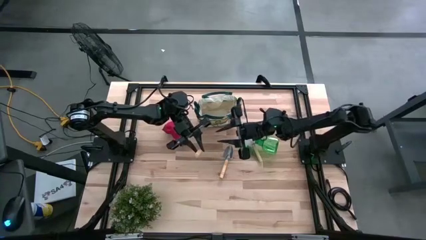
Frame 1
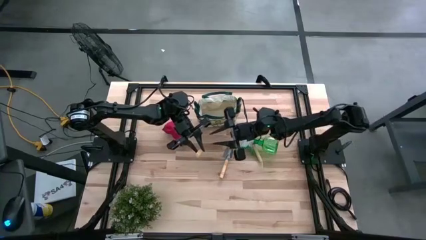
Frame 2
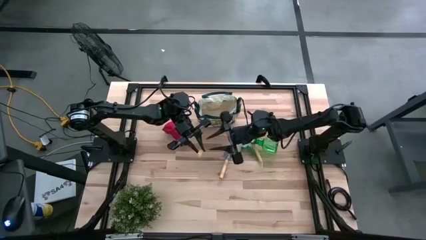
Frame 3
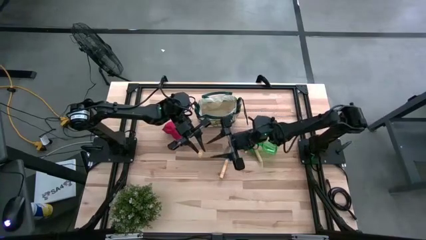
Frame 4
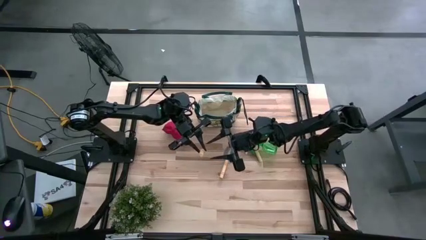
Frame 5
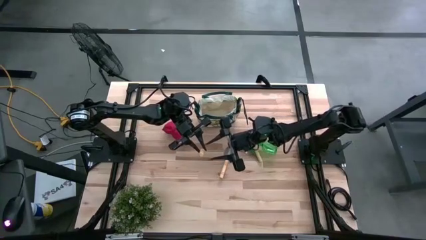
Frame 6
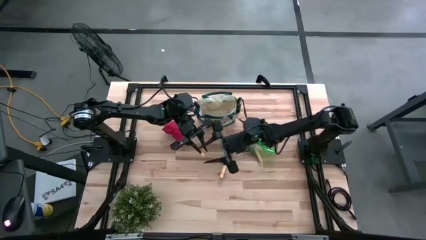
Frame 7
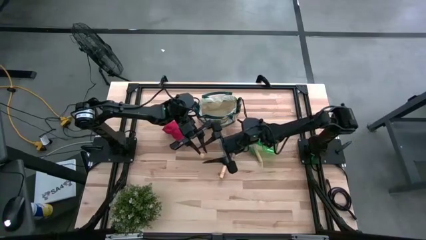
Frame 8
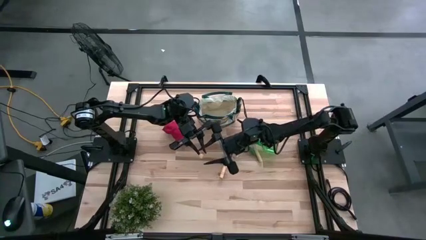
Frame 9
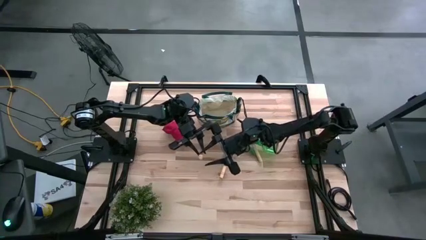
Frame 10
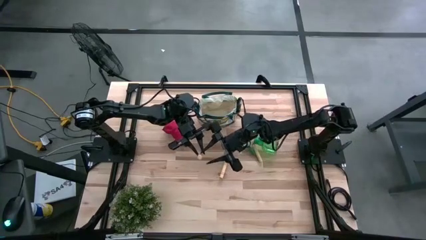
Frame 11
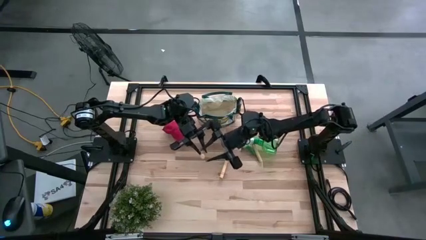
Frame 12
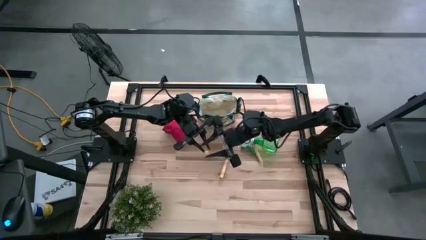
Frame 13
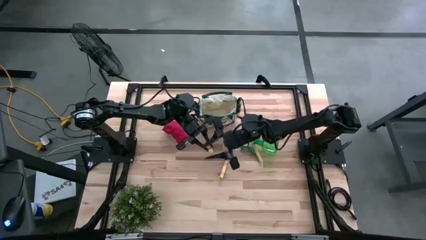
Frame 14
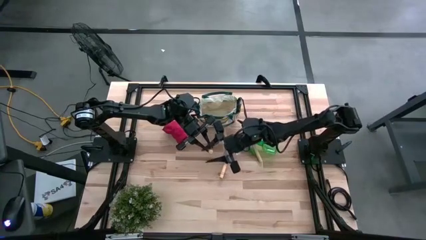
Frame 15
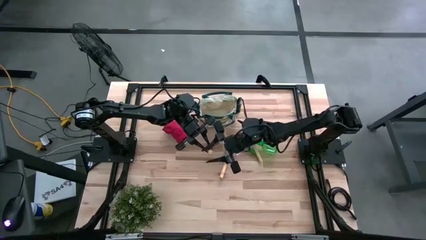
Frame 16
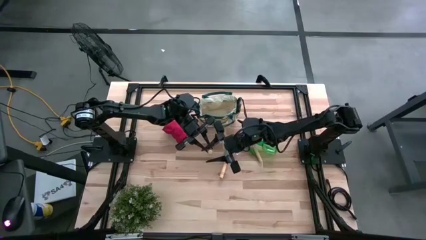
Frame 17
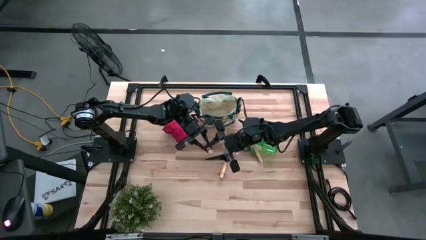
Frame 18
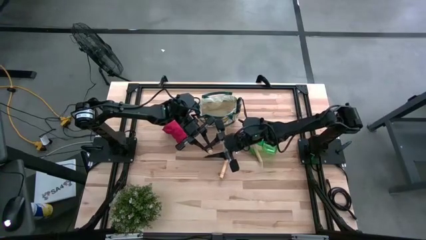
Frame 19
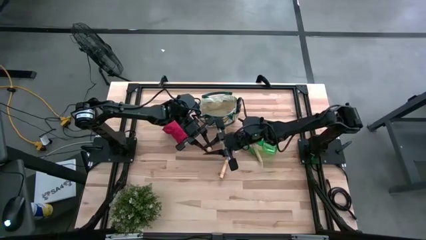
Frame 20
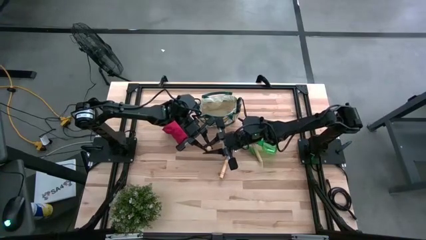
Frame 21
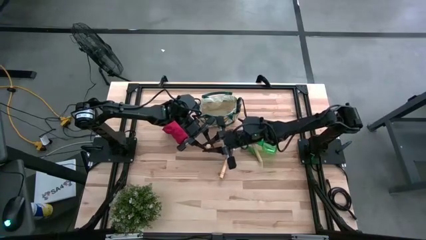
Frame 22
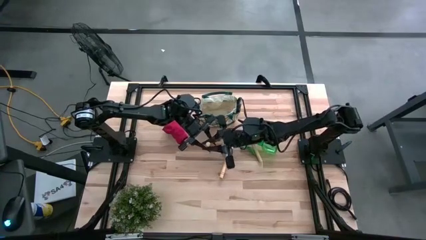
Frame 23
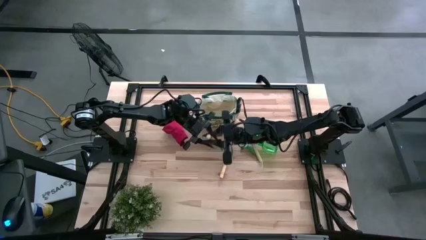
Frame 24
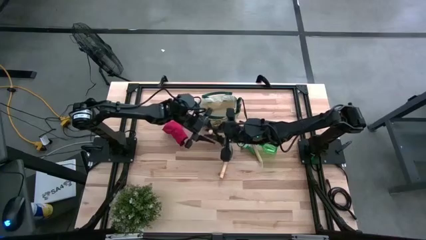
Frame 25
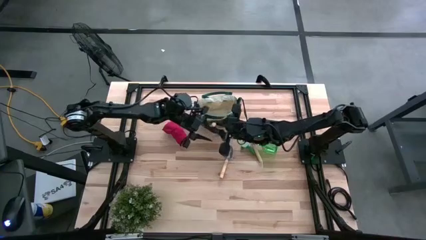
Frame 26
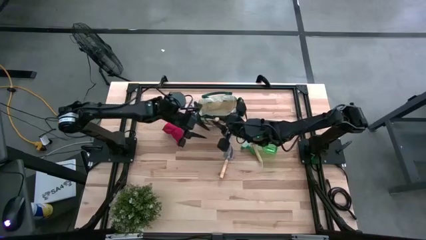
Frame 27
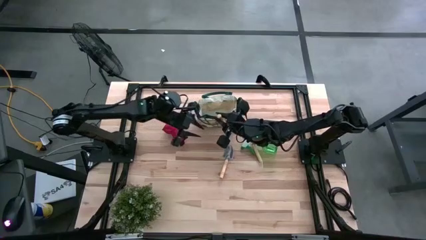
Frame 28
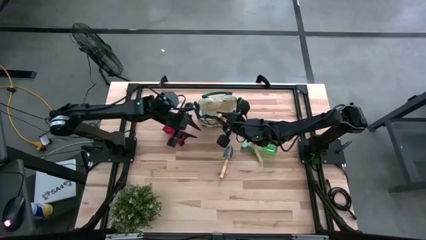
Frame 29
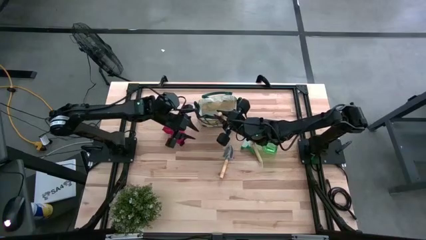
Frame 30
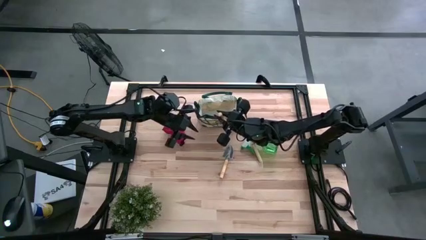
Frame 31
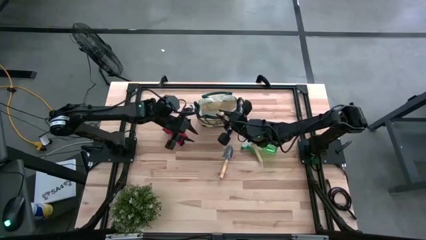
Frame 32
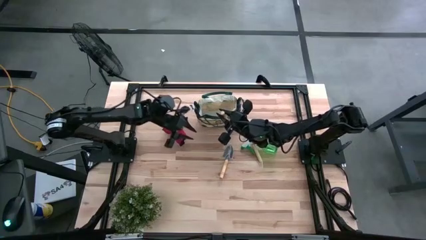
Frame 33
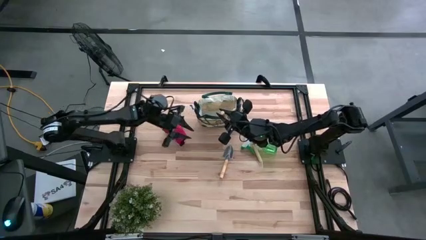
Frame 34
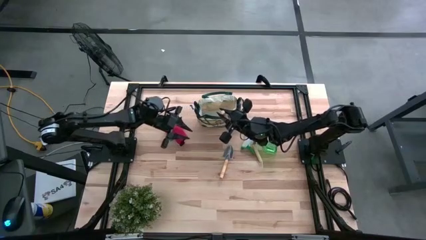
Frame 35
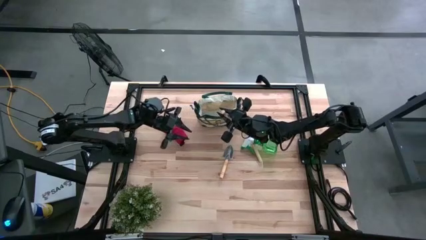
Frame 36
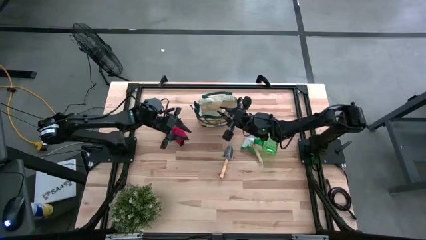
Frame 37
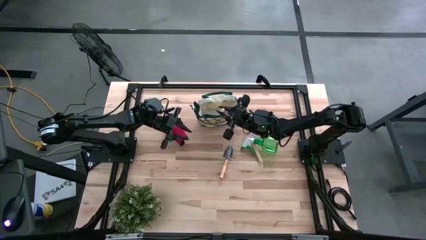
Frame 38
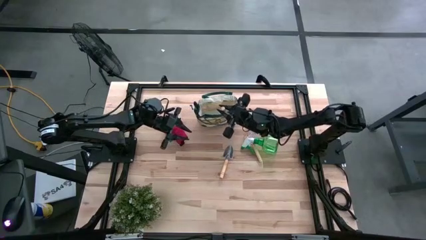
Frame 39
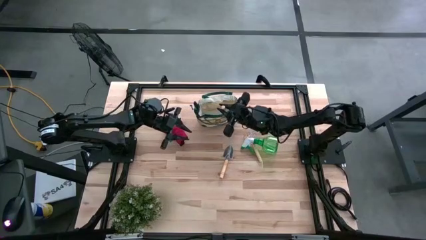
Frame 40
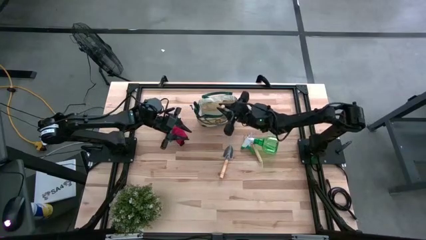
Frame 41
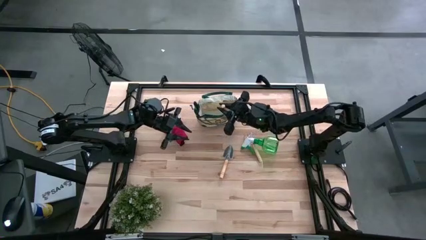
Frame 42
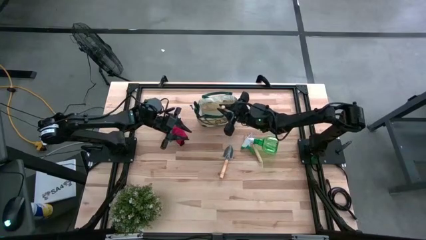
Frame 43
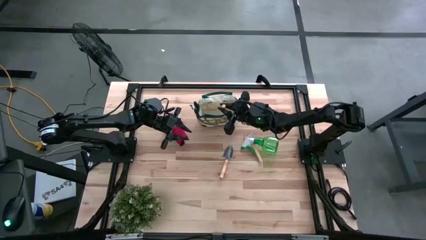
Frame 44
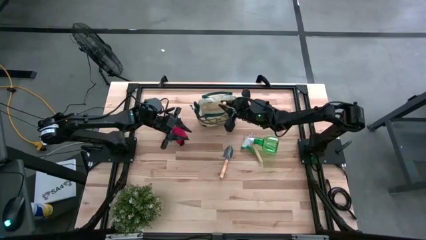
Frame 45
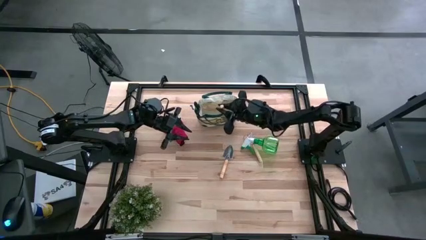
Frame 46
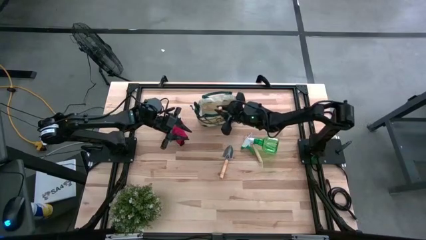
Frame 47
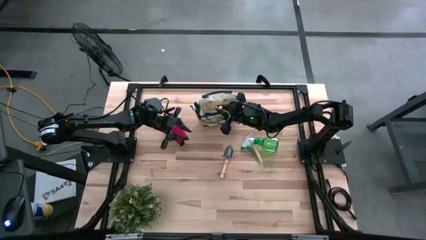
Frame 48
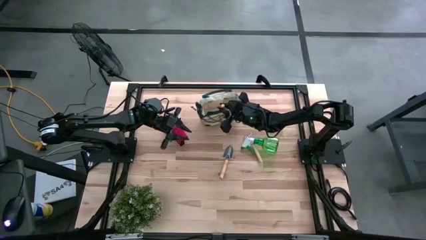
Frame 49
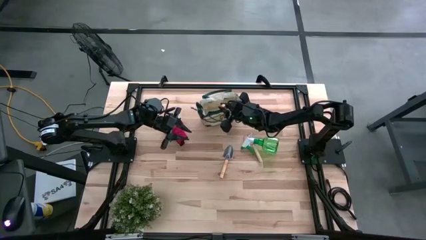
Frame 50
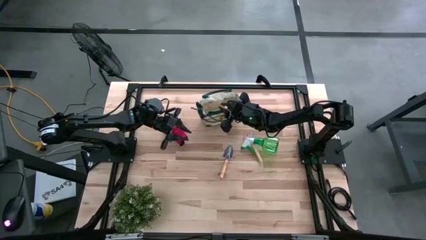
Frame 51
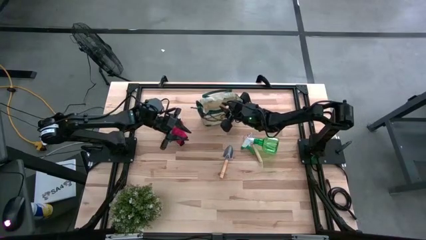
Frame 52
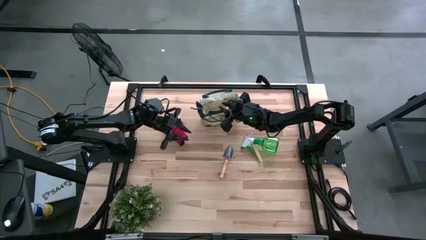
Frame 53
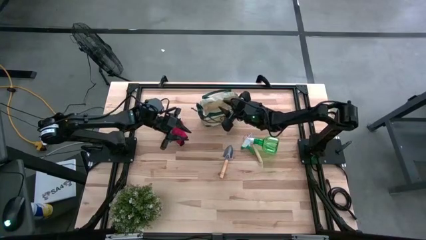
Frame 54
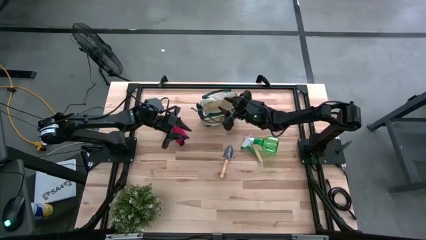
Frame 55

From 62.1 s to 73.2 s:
Task: Pick & Place Garden tools in Gardening bag
Put the right brown trowel into the gardening bag

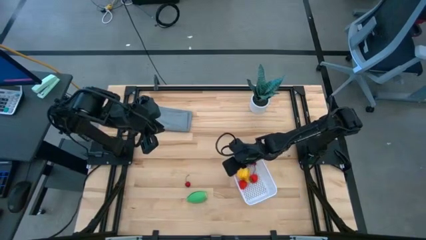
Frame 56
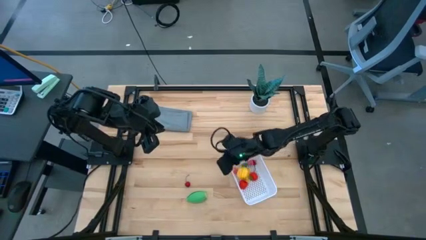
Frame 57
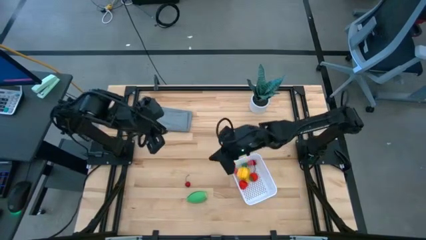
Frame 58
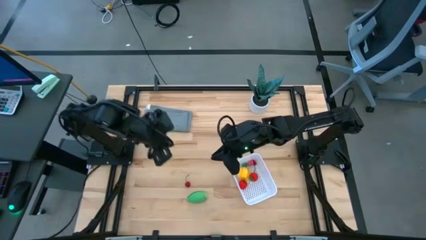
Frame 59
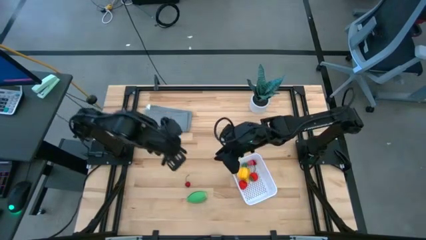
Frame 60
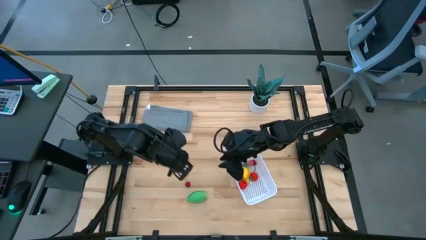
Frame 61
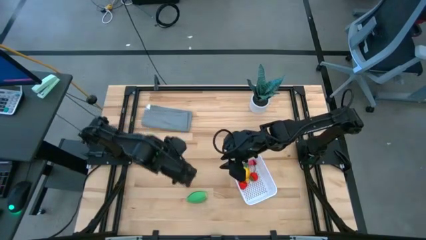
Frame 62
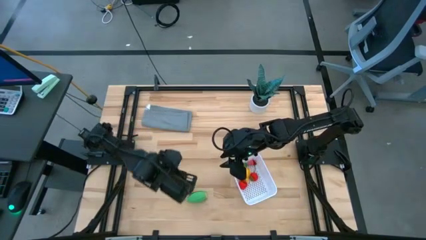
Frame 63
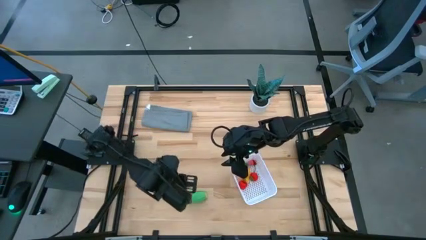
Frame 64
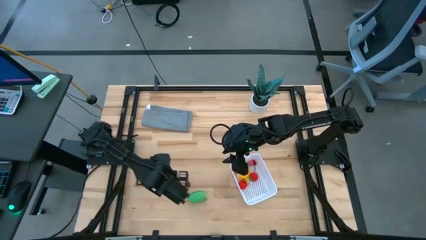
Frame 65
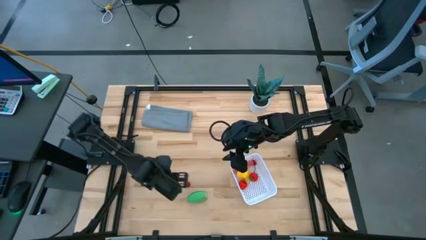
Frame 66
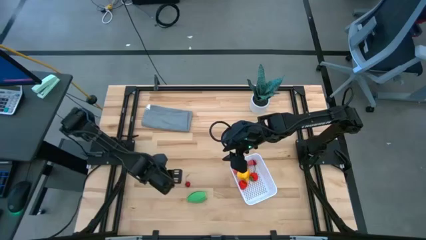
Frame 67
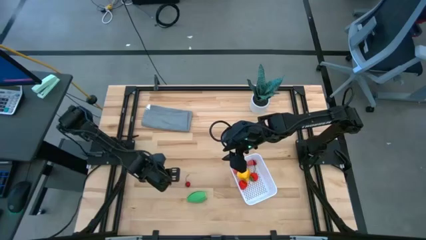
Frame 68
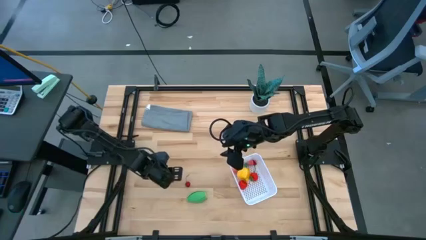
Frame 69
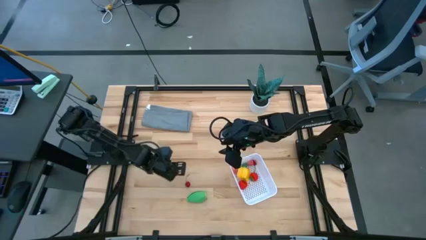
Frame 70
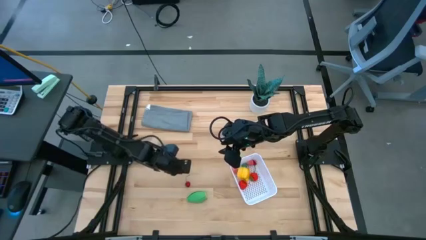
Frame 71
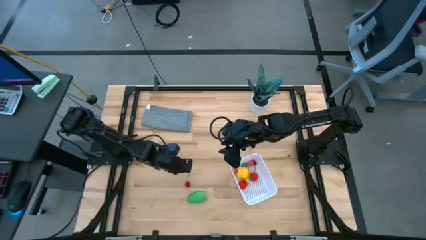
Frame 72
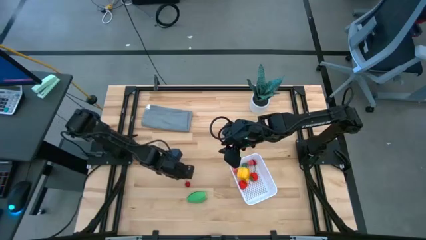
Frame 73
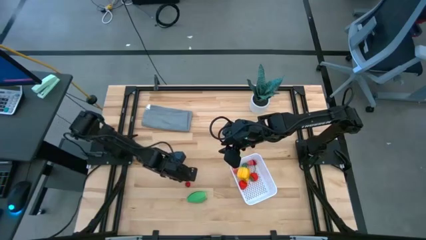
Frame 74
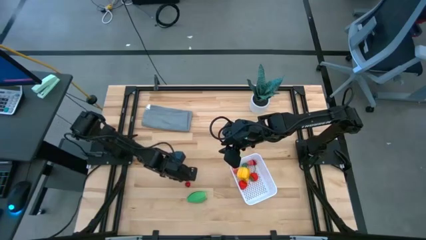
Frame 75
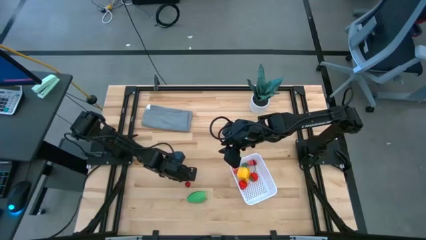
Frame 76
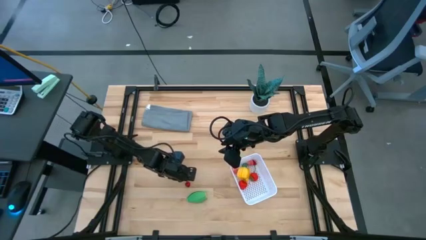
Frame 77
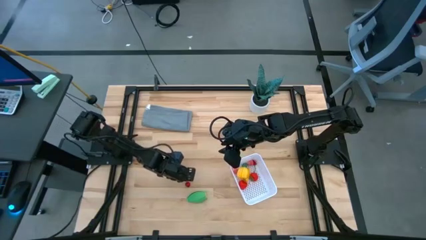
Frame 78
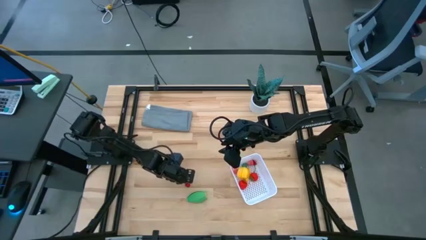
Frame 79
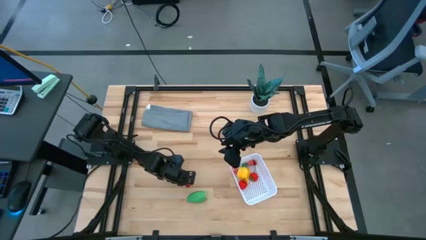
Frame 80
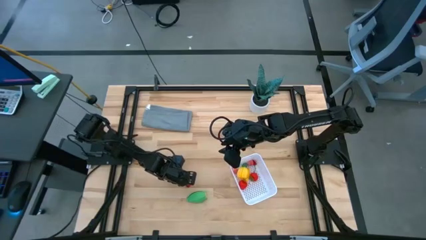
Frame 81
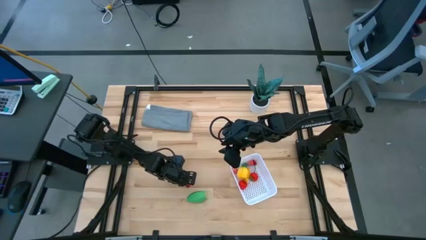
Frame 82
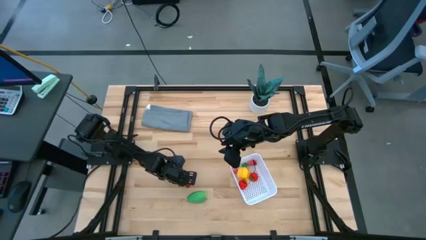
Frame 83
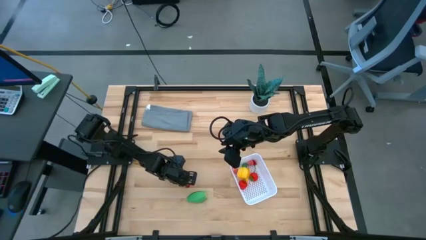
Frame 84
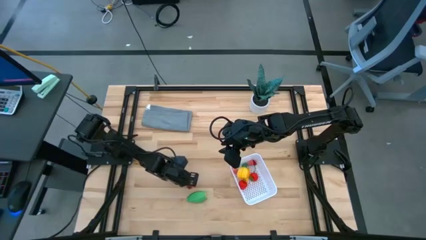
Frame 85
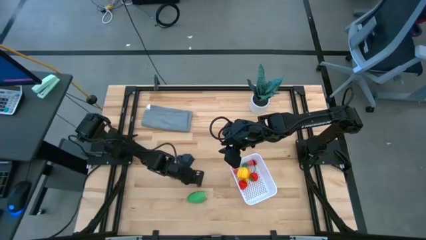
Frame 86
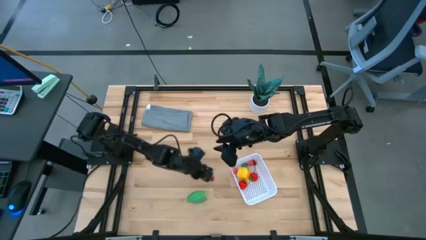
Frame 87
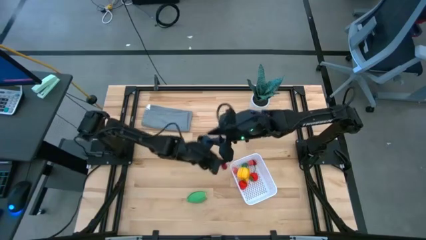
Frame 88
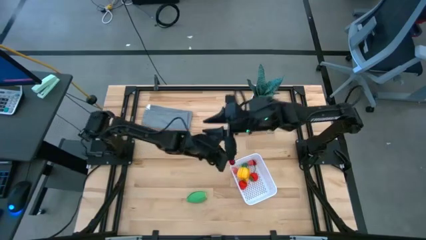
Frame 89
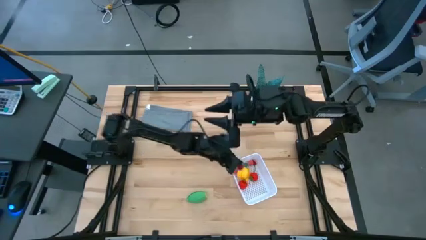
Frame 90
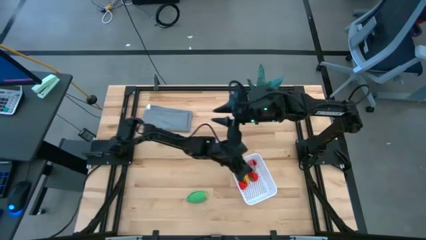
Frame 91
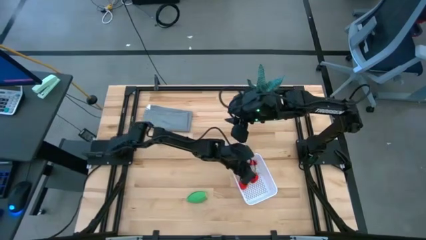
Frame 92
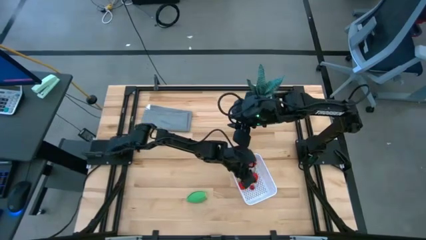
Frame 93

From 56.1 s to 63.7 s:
Task: Pick and placing Produce into tupperware
Put the cherry into the white bin
